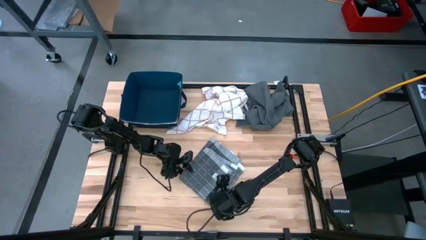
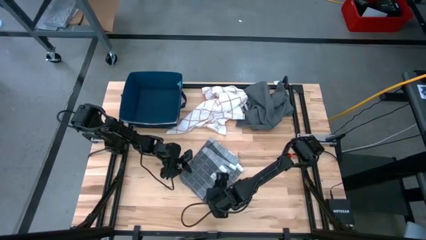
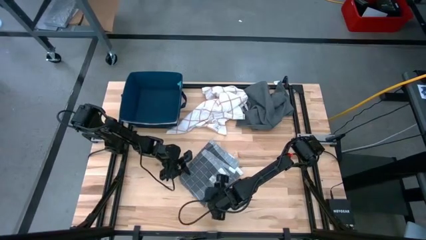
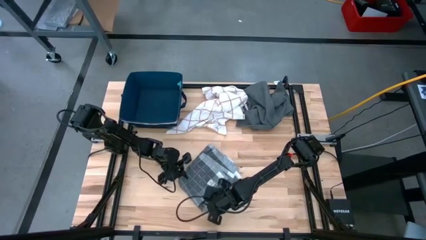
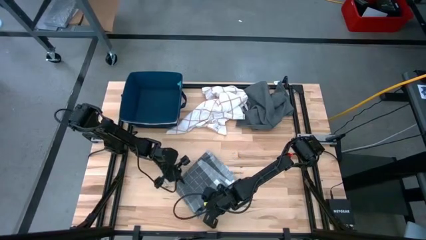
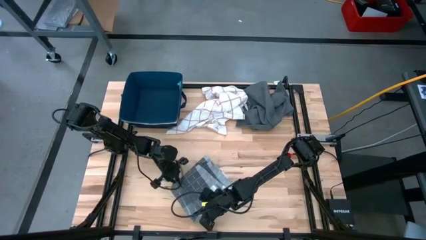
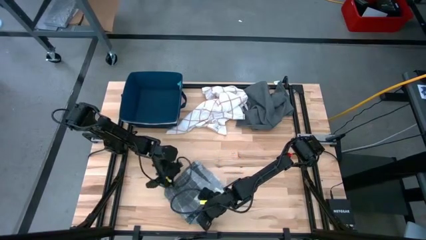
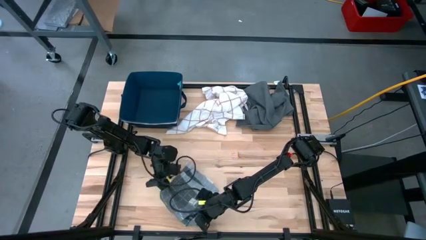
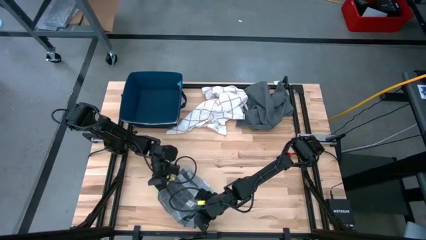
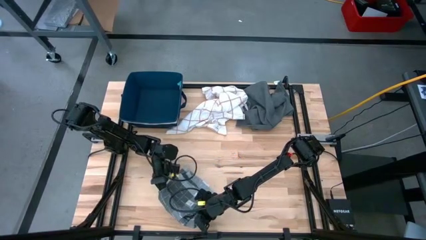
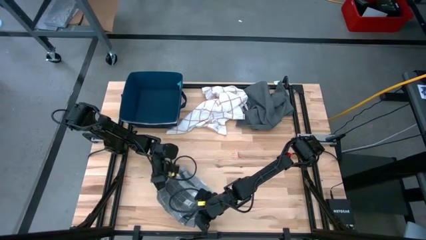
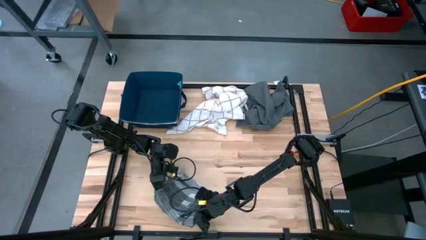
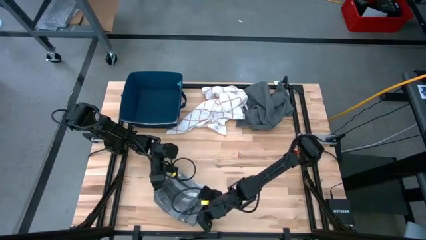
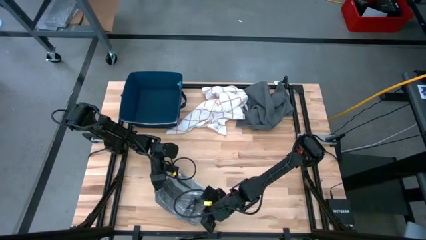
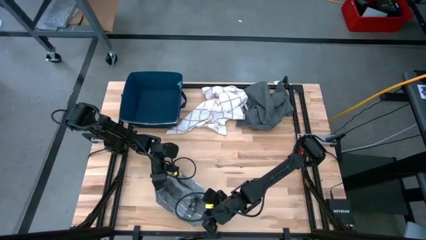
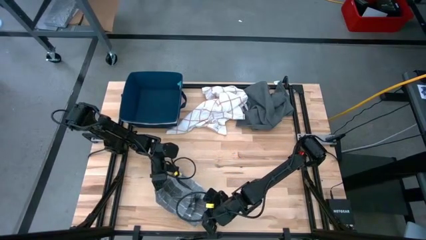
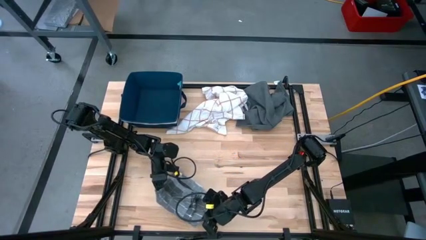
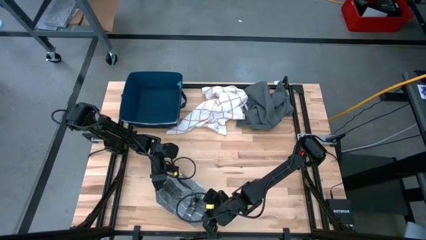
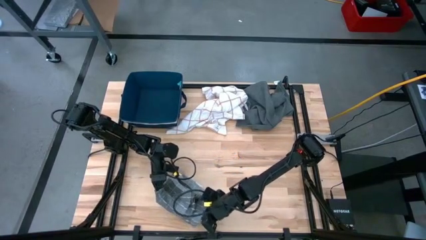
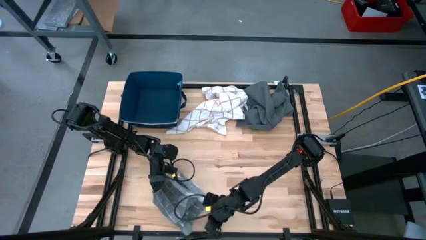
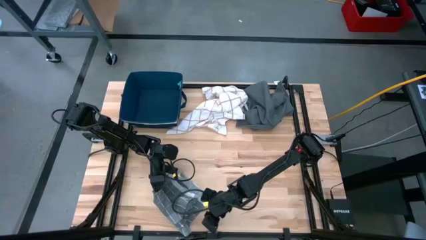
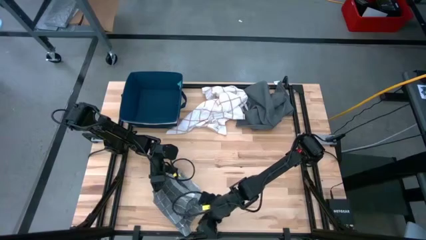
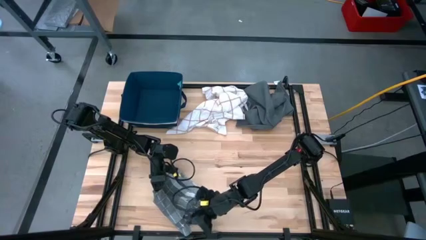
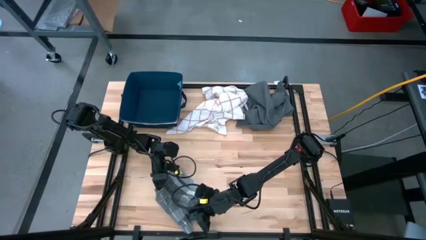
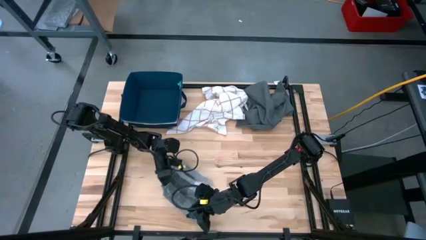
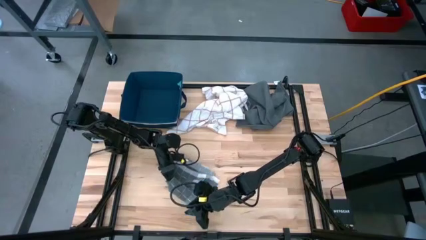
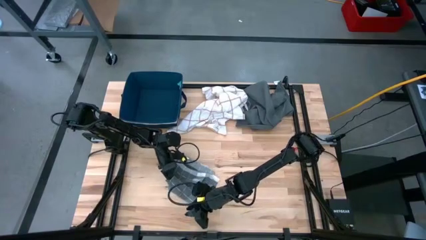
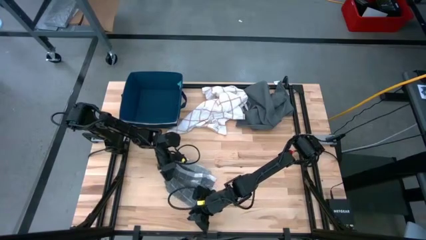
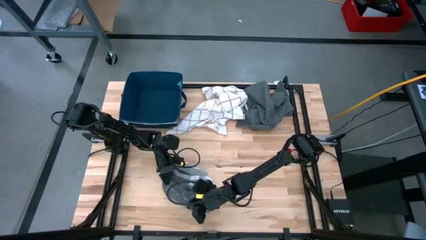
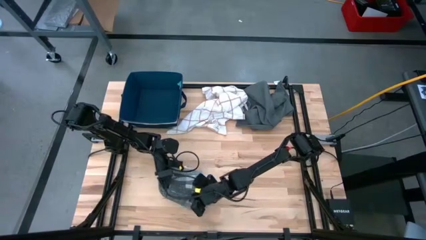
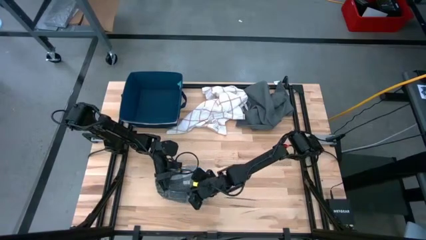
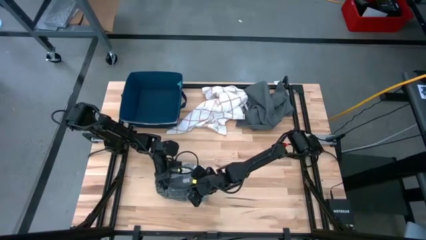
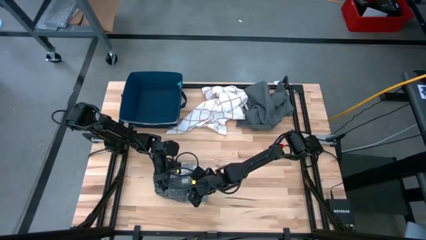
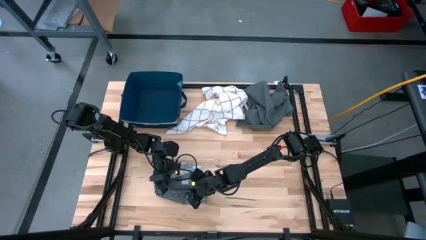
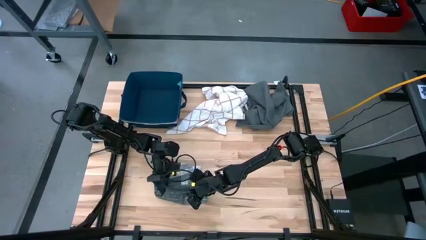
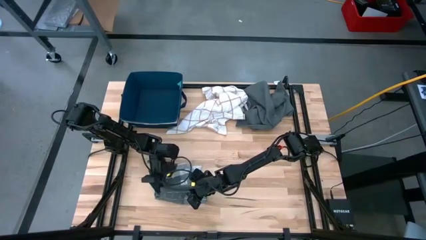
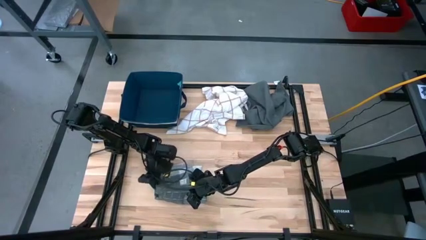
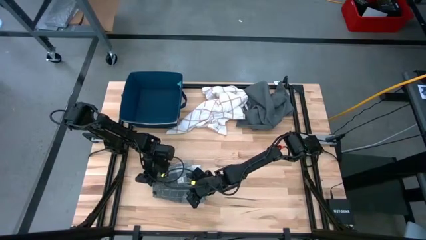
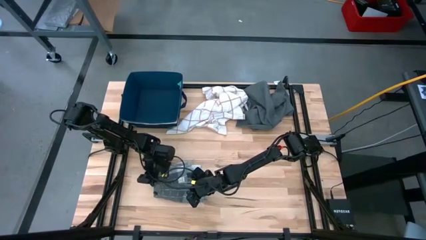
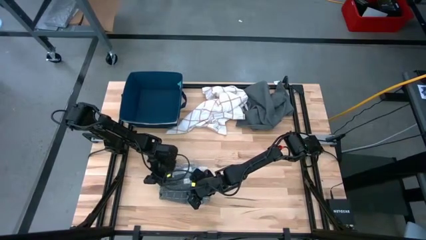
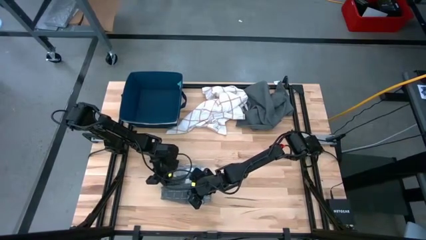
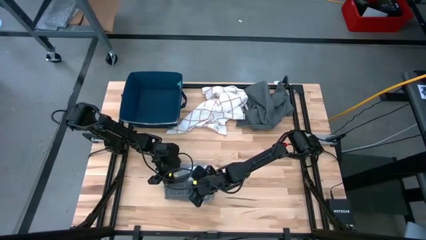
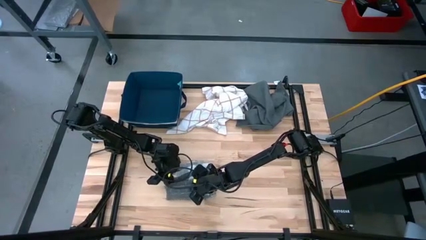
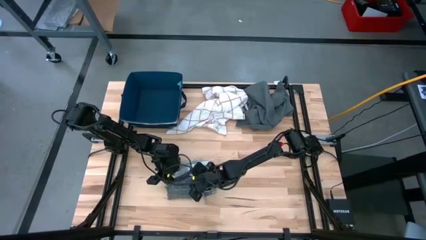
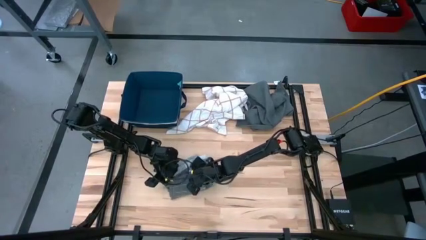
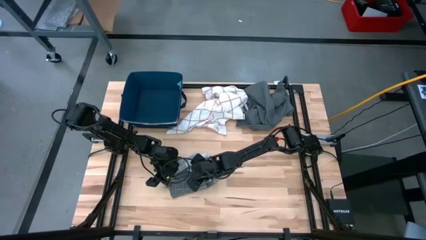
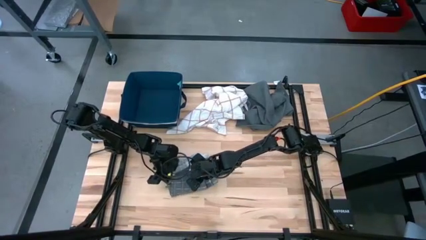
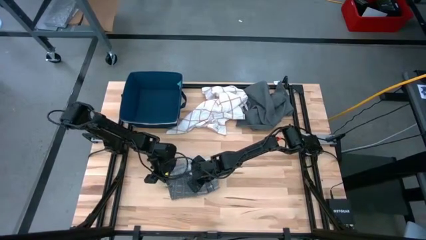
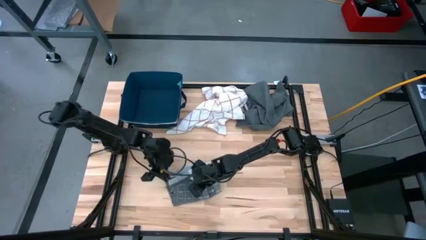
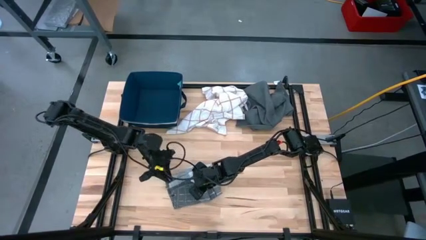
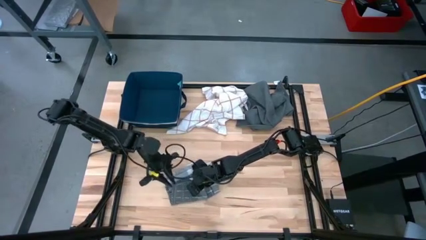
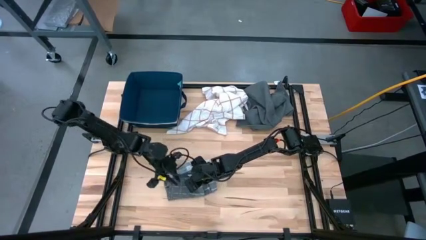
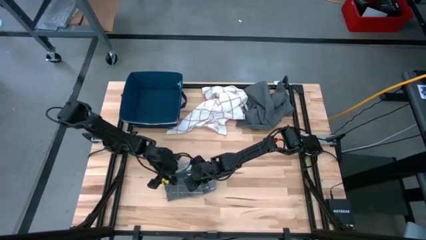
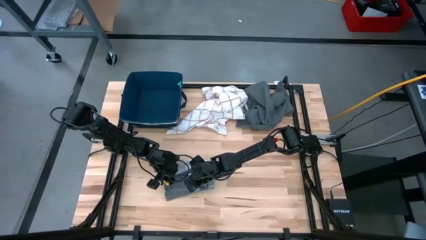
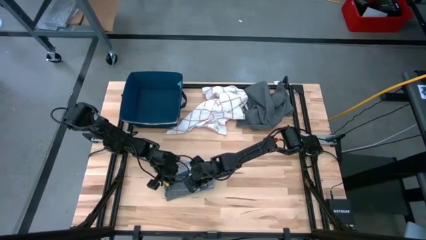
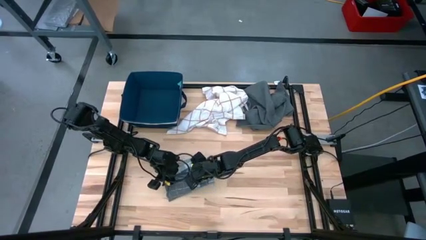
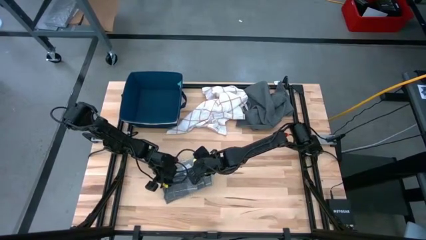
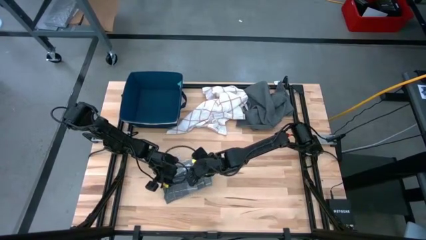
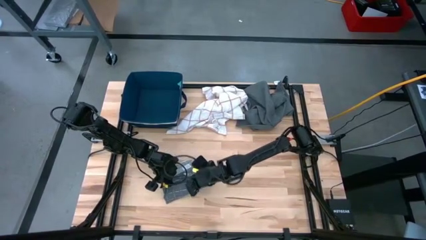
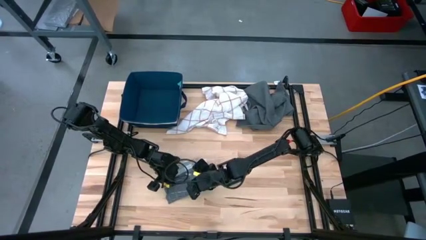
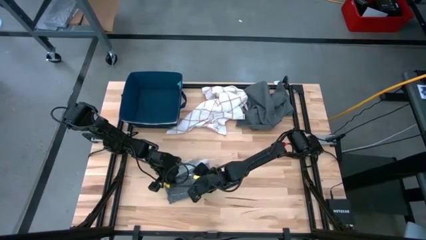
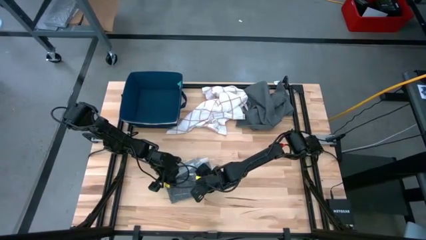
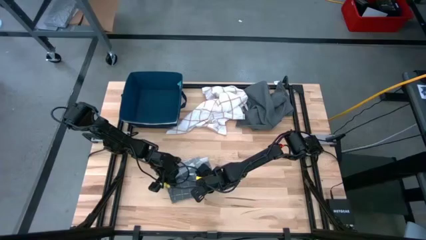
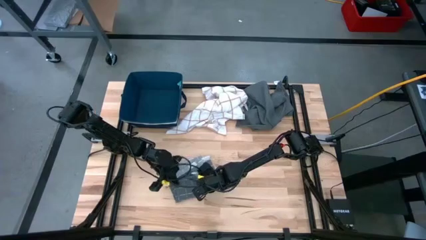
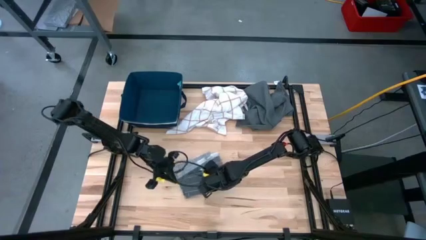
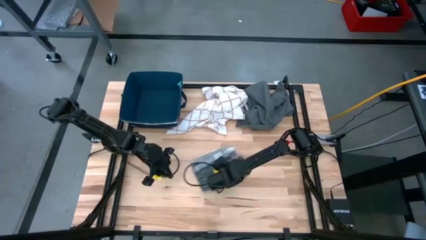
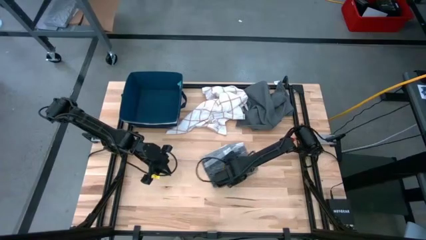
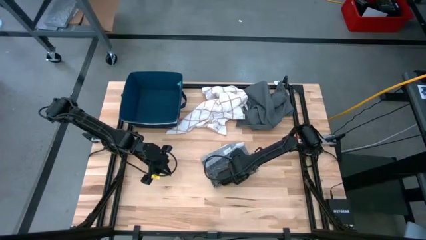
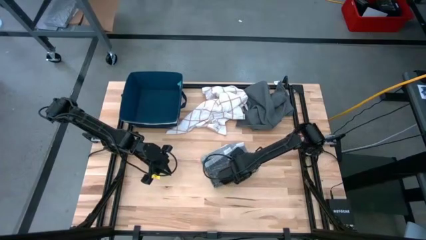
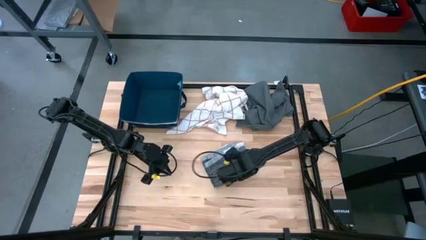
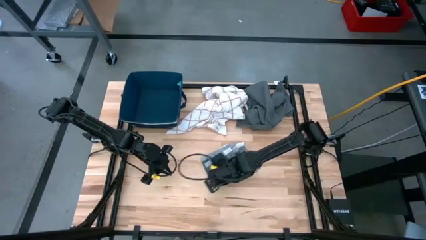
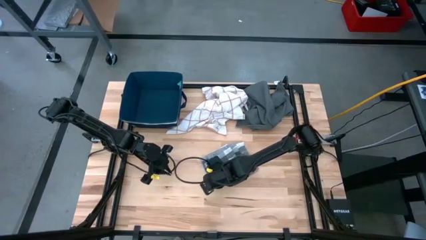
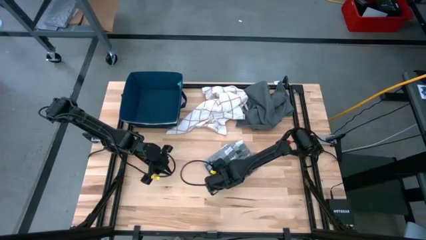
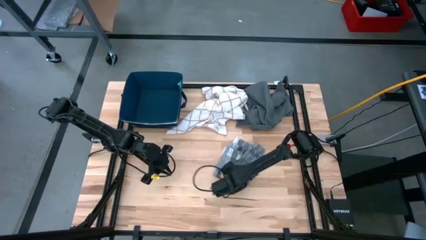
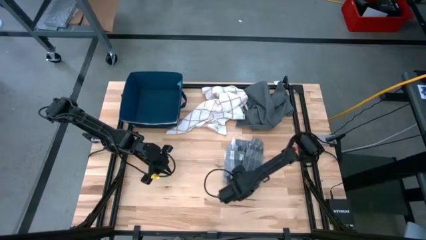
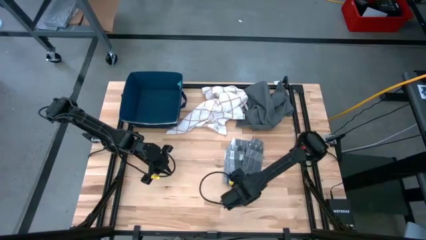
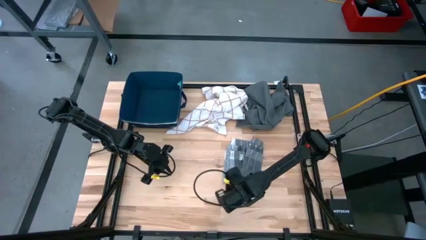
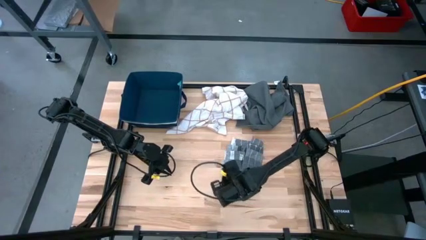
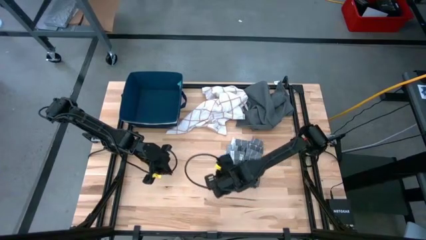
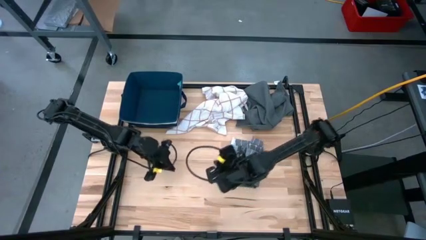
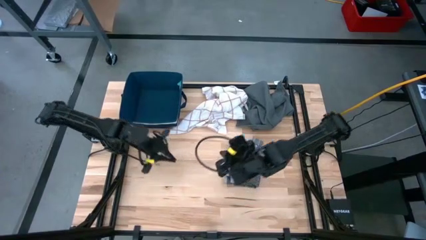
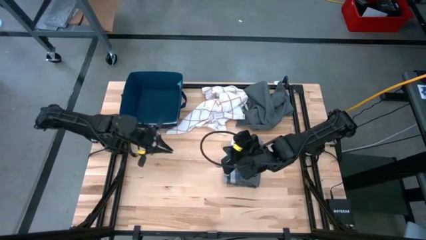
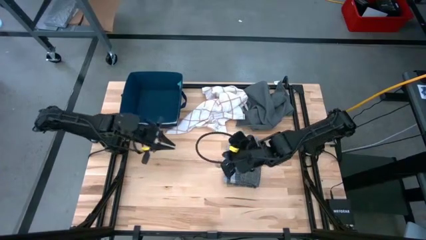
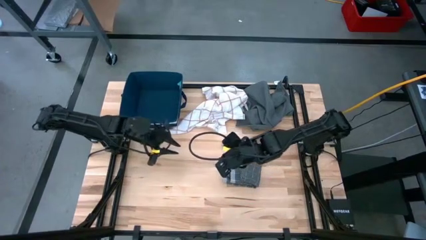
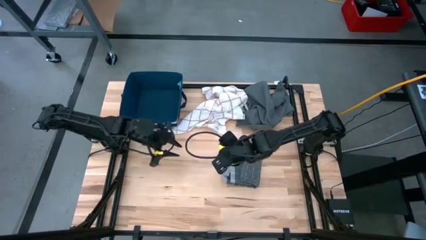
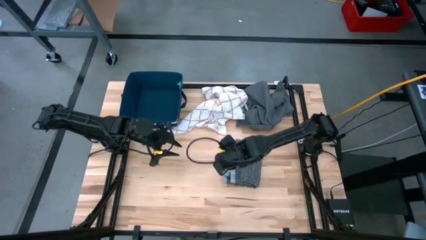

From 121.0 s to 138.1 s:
Task: Fold towel
Fold the gray patterned towel

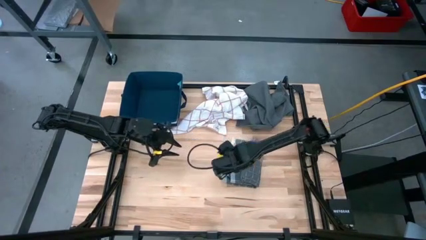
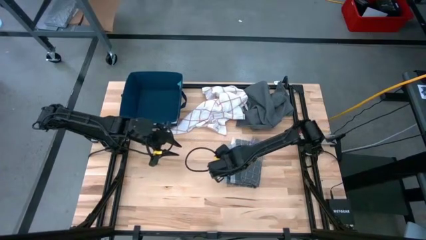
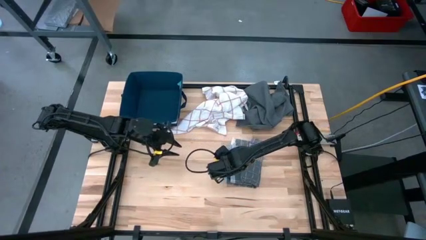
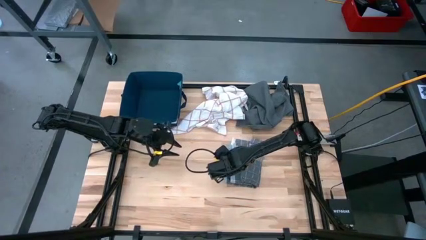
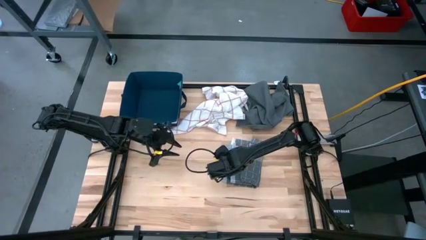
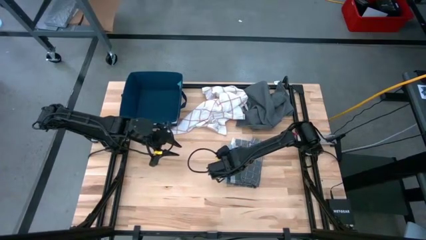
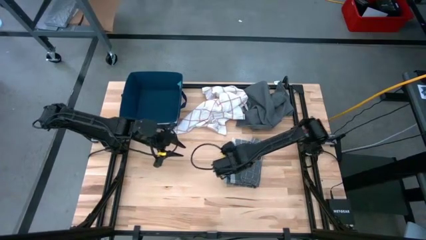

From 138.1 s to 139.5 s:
Fold the gray patterned towel
